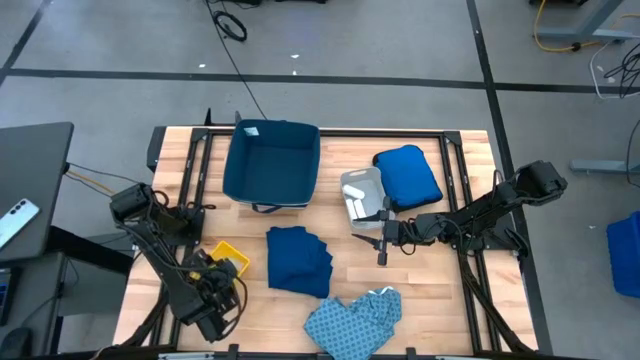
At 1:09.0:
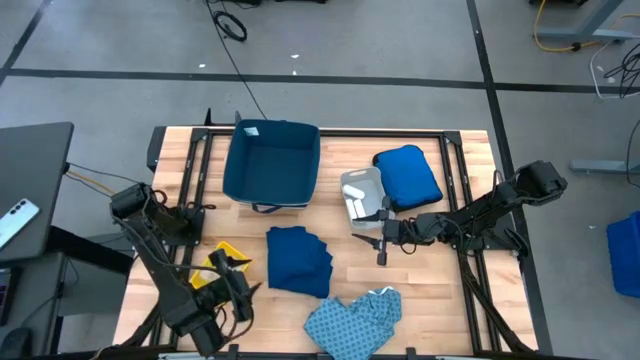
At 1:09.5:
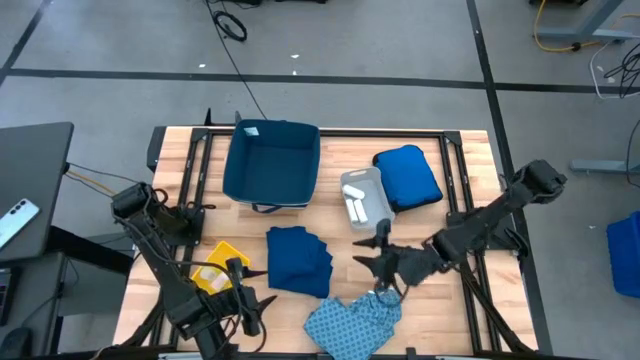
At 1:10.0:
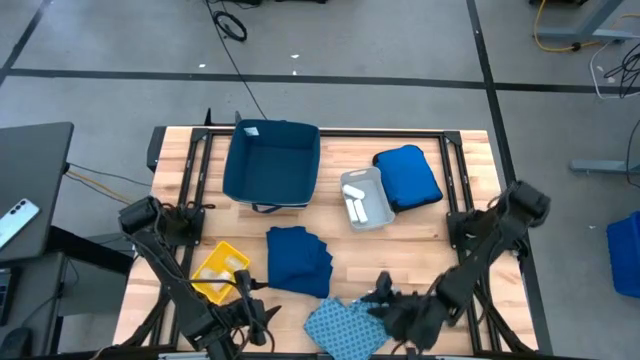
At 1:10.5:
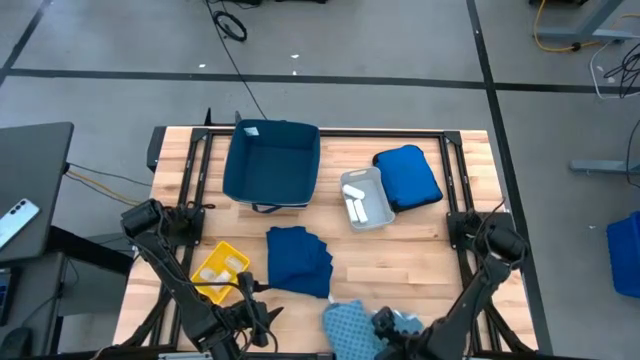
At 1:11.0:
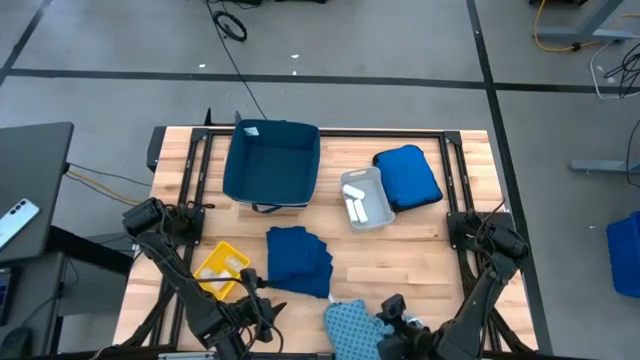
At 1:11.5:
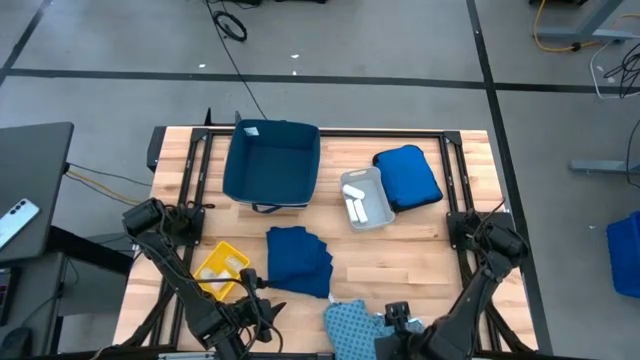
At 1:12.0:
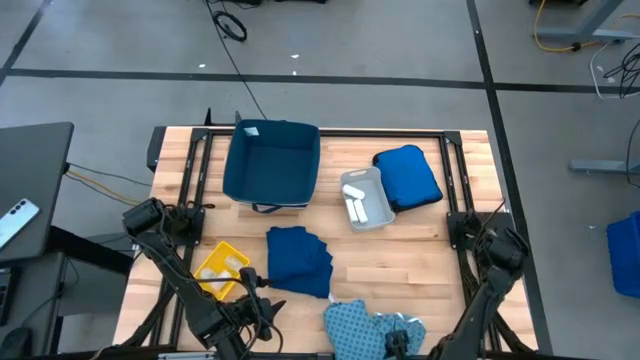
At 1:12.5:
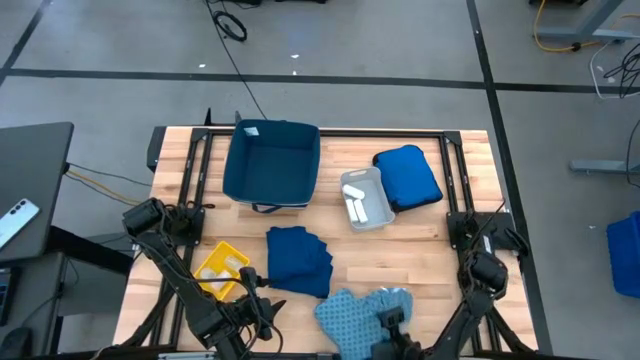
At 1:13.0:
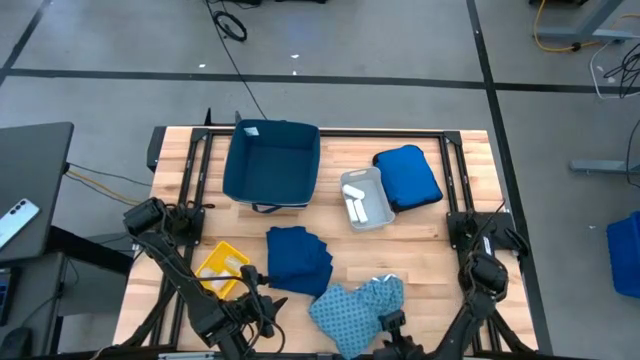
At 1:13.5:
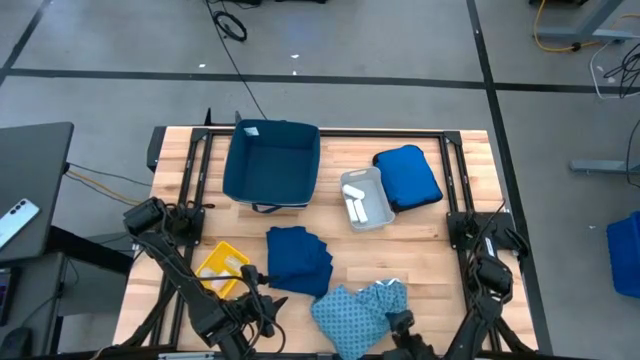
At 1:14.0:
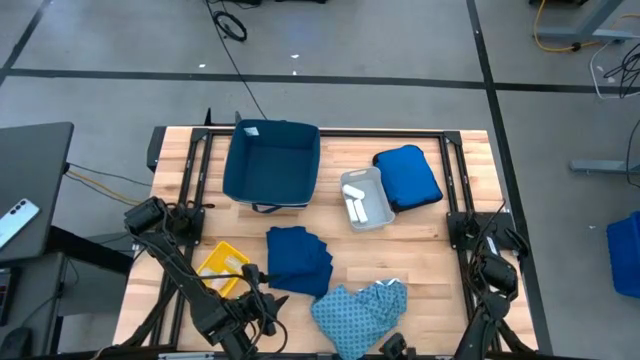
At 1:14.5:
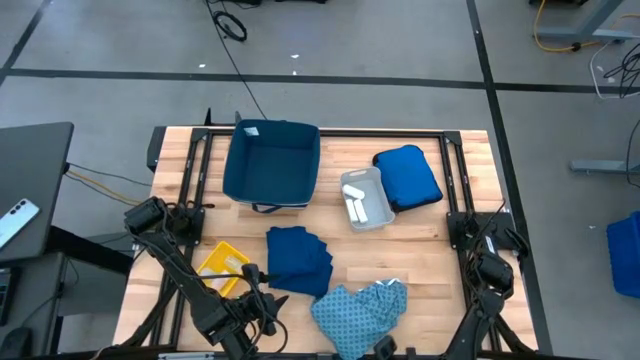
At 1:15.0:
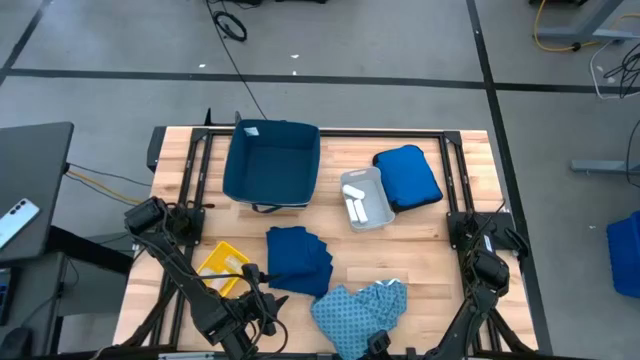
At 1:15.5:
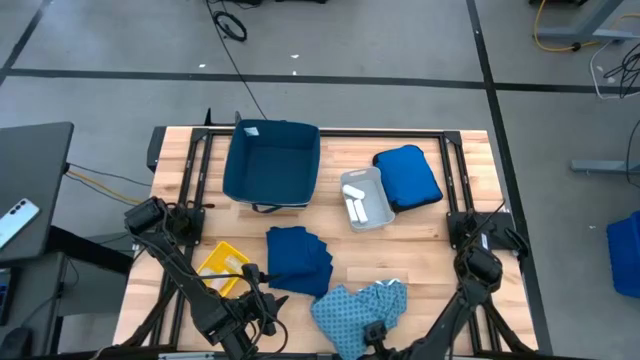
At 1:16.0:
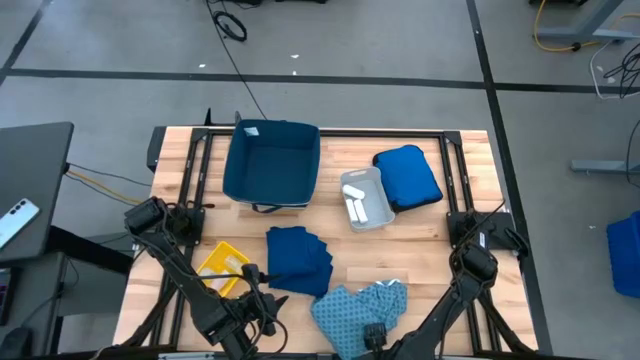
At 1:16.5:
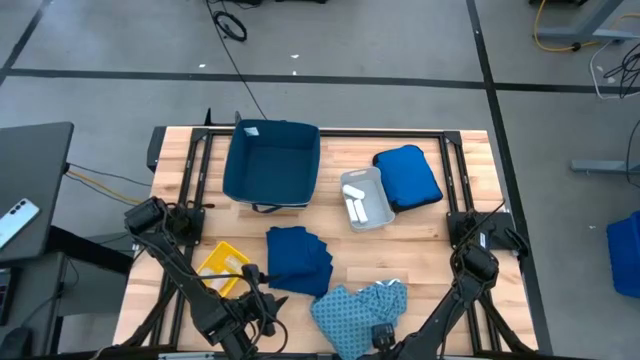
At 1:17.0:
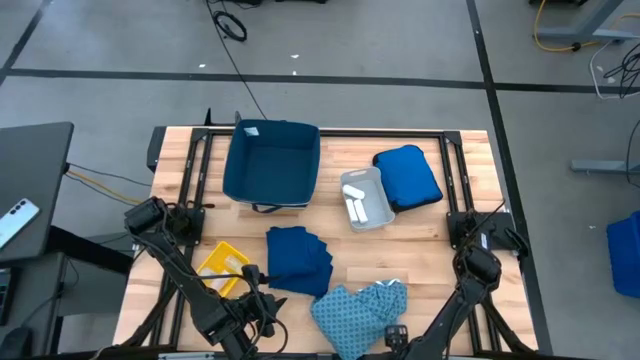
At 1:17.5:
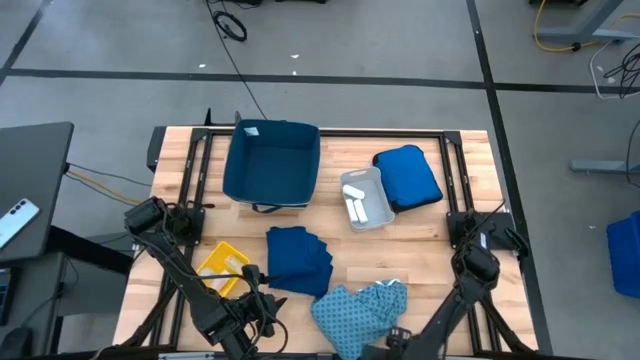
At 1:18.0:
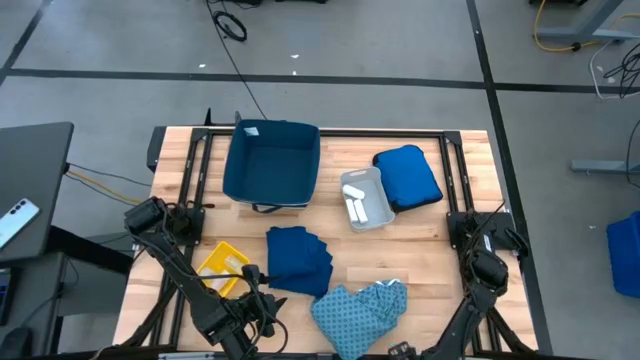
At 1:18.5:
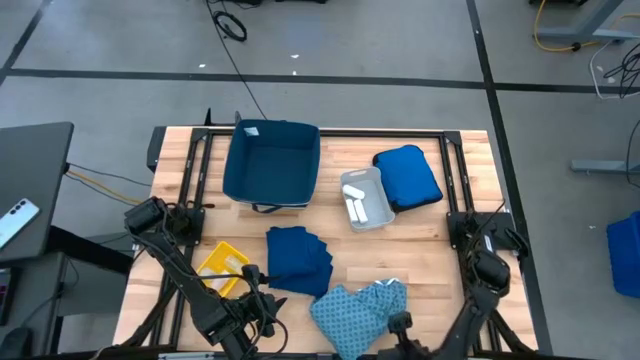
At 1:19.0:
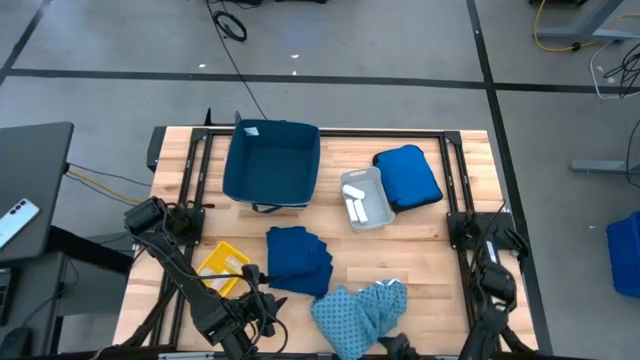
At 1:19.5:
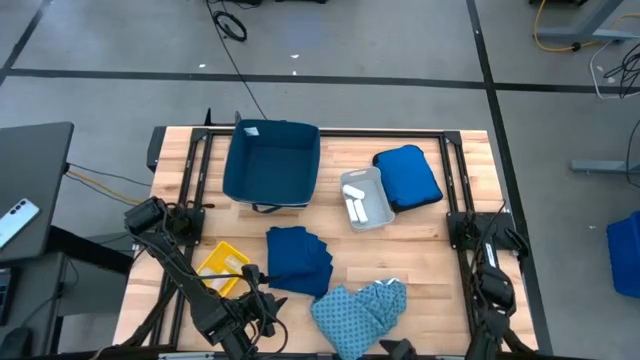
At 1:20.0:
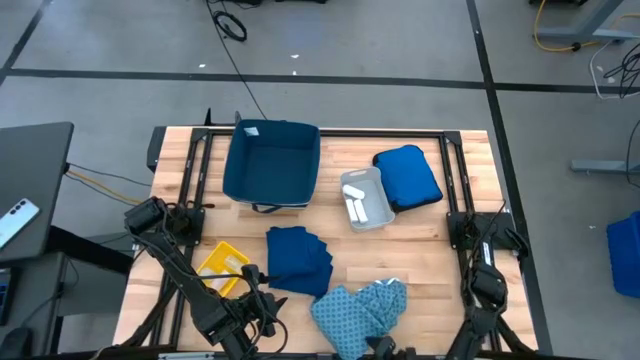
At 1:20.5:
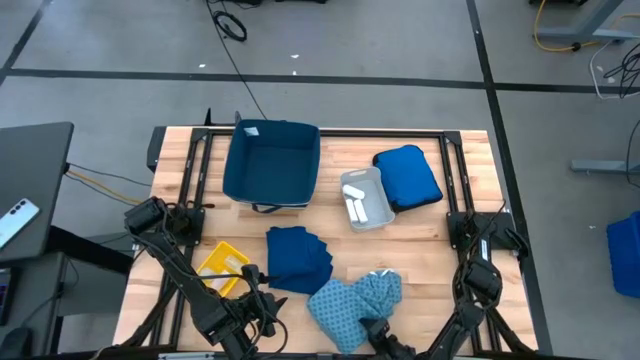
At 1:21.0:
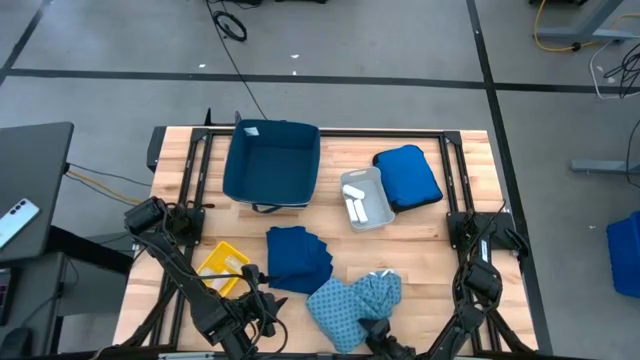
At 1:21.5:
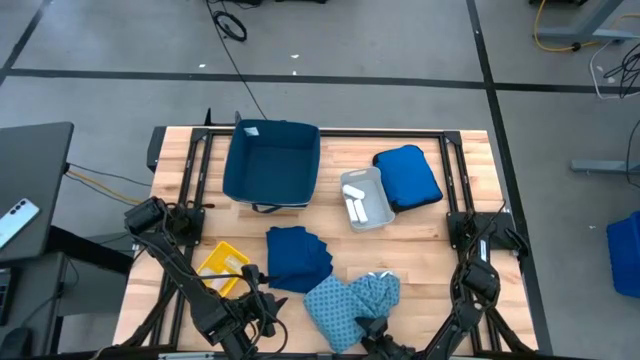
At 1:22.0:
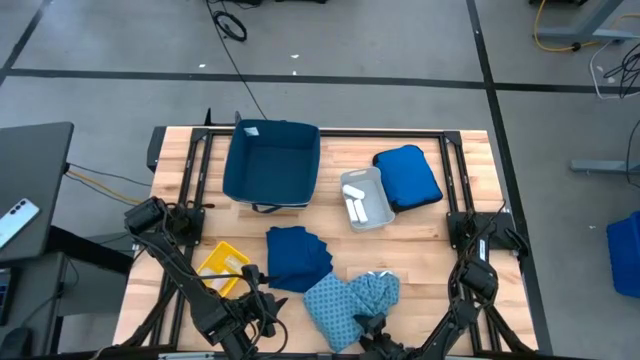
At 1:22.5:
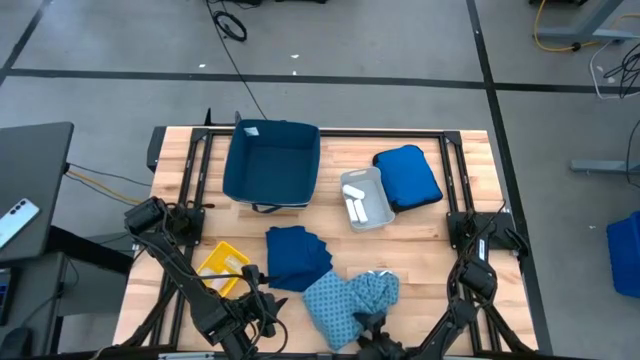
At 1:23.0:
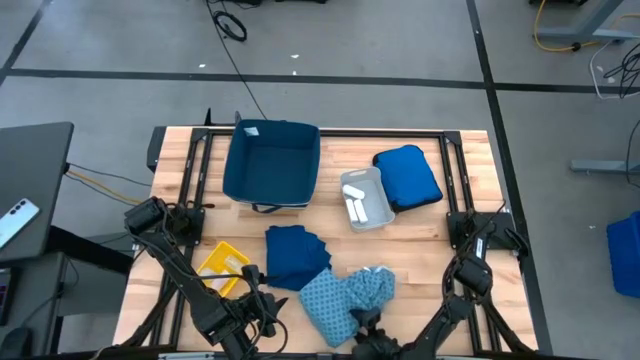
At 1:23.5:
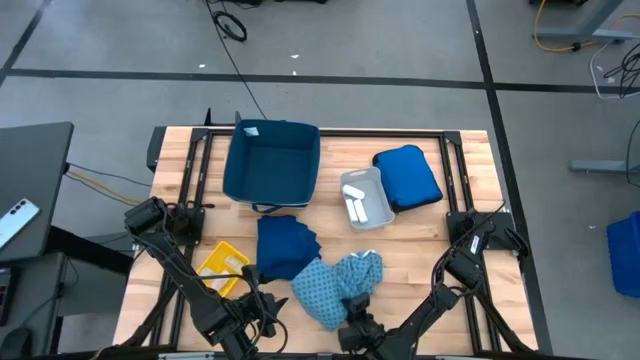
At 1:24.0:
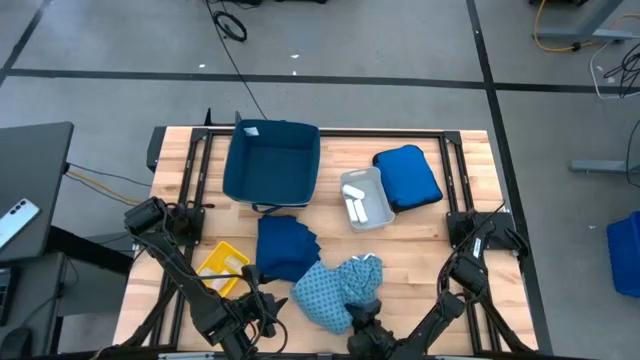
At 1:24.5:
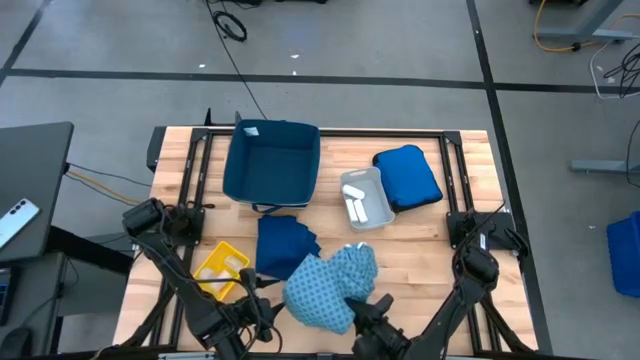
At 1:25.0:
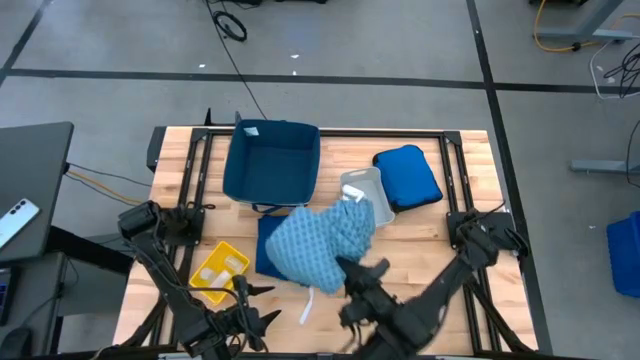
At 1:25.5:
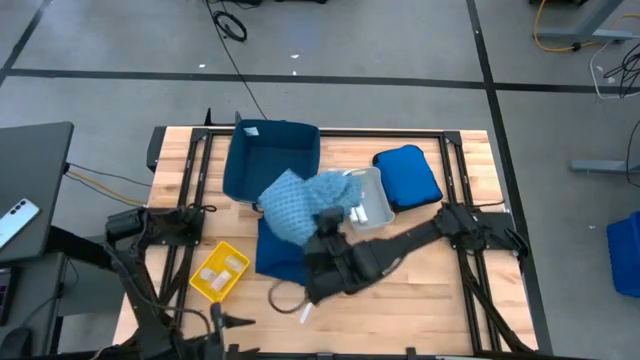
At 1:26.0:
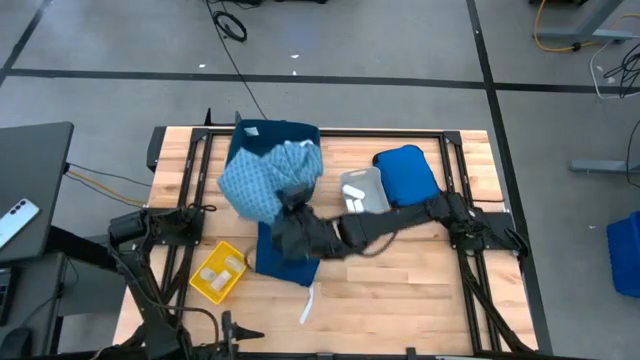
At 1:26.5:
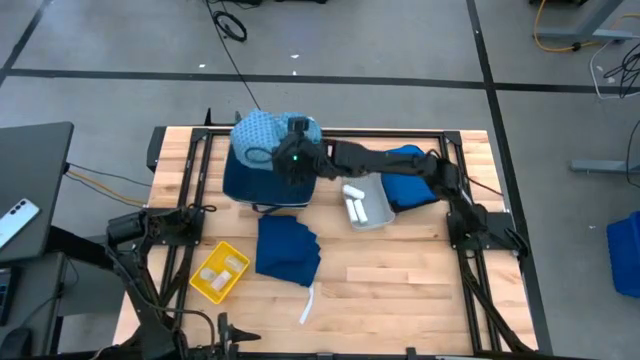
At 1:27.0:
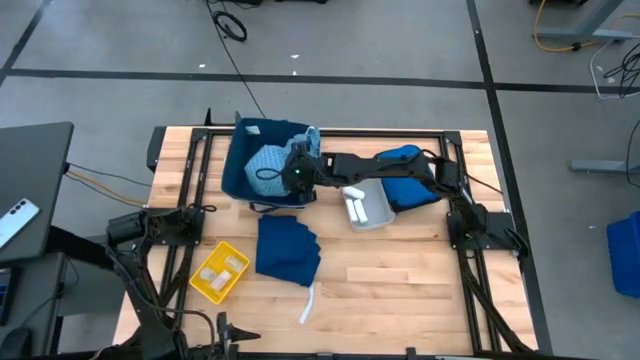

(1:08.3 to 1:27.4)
Task: Pick & place medical supplies in basket/bin
Put the gray patient gown into the blue bin
